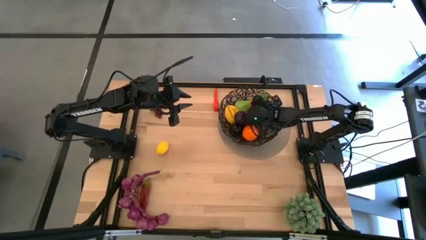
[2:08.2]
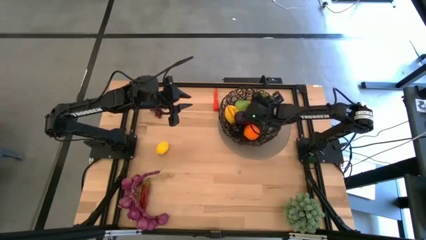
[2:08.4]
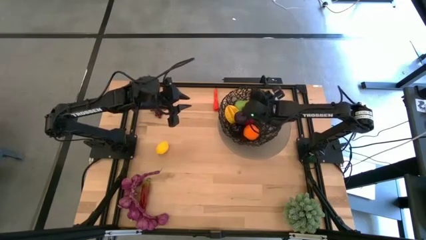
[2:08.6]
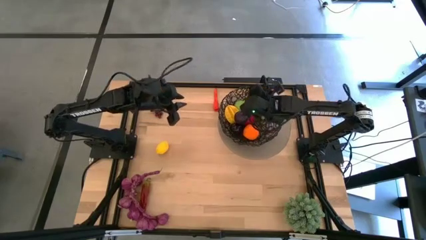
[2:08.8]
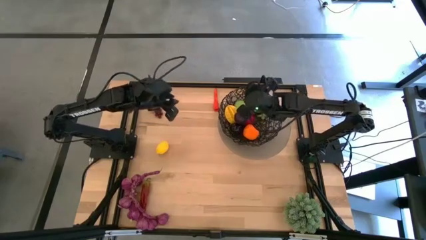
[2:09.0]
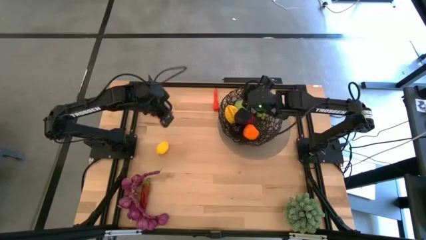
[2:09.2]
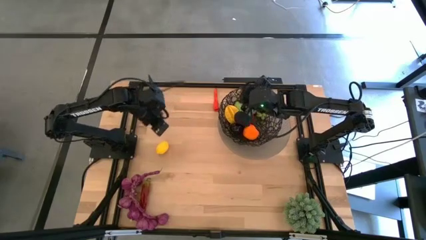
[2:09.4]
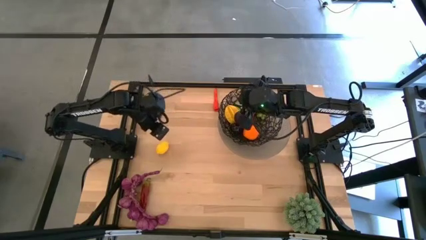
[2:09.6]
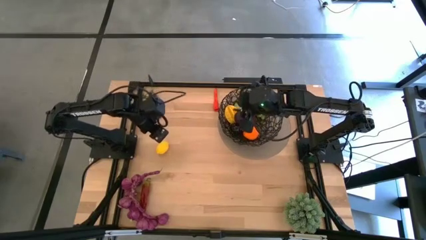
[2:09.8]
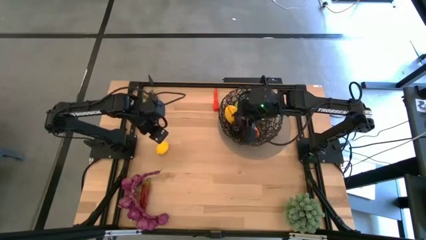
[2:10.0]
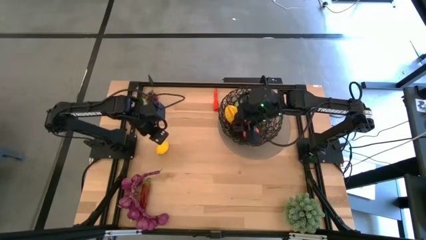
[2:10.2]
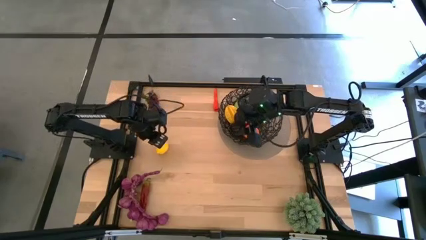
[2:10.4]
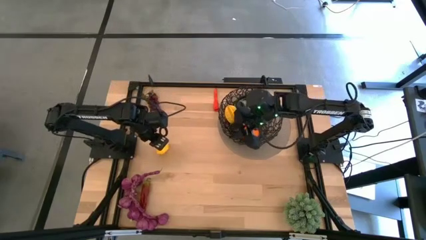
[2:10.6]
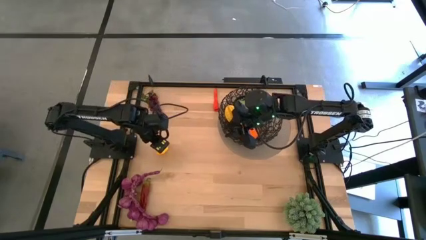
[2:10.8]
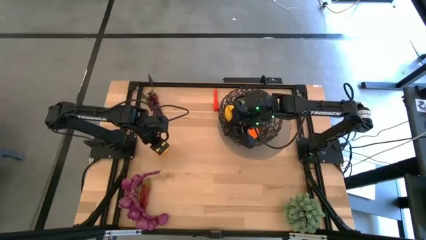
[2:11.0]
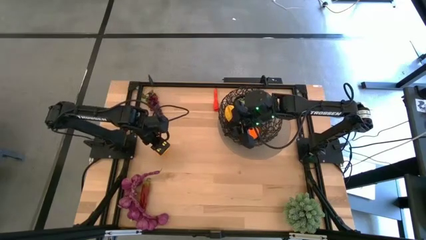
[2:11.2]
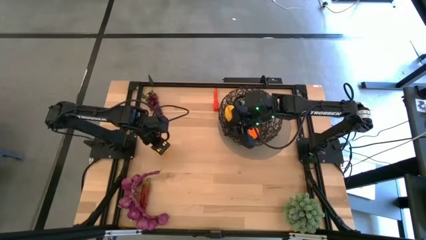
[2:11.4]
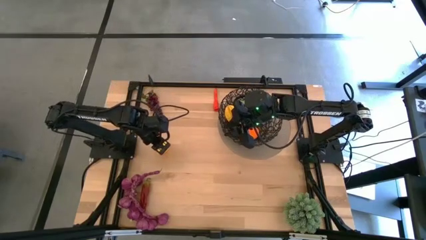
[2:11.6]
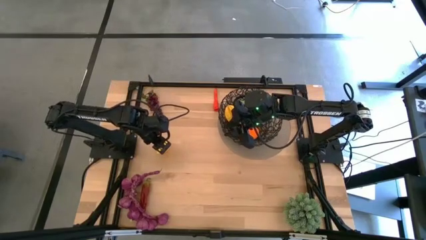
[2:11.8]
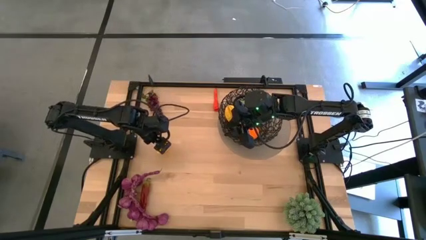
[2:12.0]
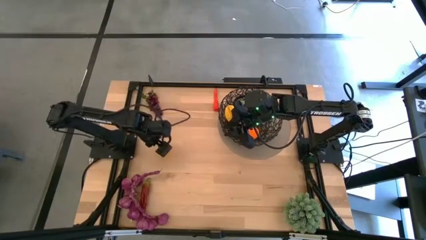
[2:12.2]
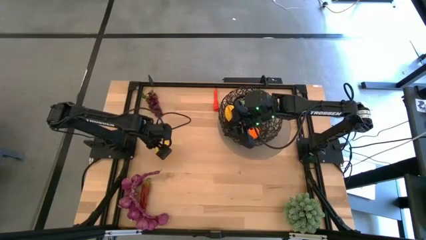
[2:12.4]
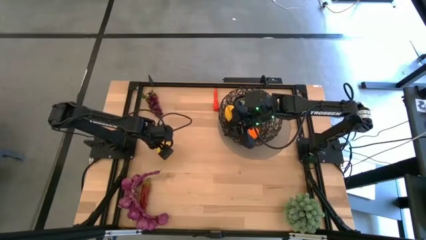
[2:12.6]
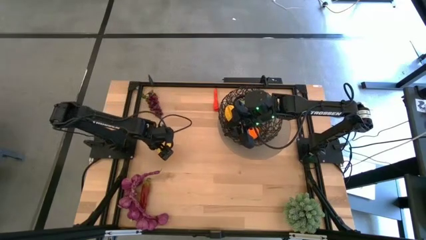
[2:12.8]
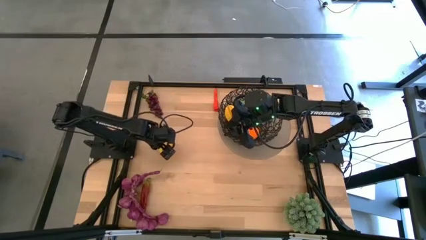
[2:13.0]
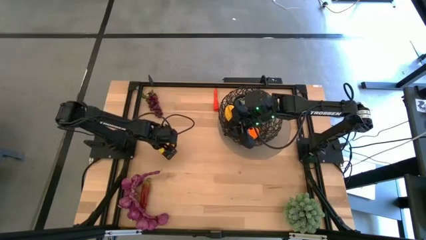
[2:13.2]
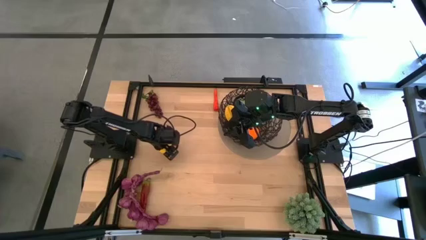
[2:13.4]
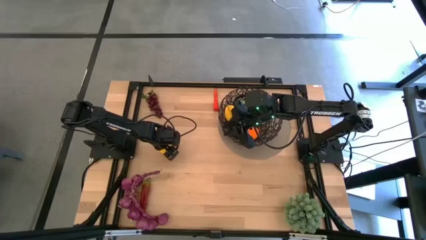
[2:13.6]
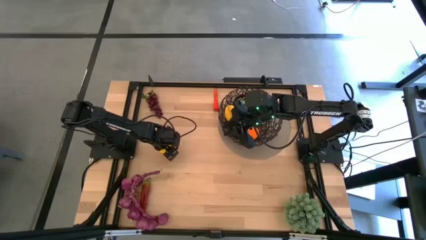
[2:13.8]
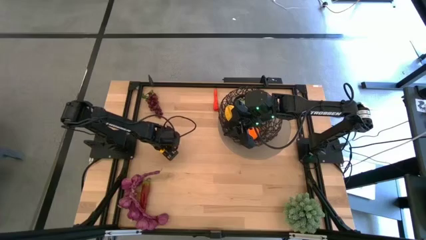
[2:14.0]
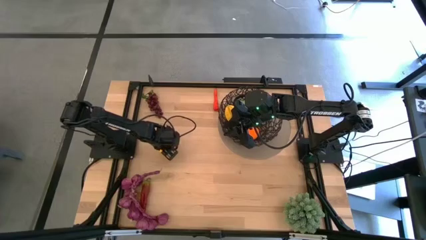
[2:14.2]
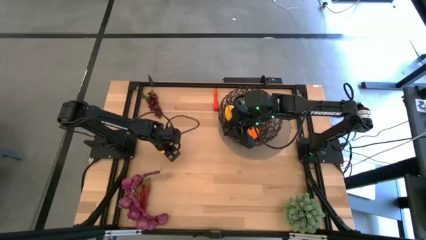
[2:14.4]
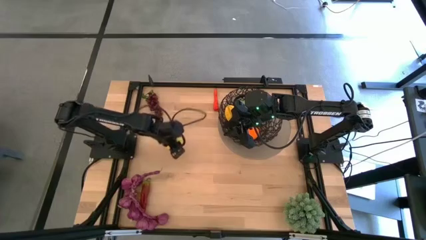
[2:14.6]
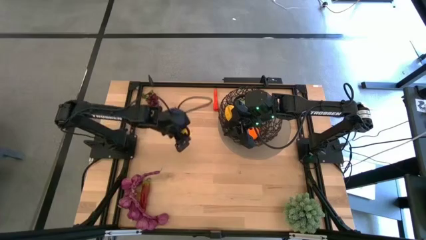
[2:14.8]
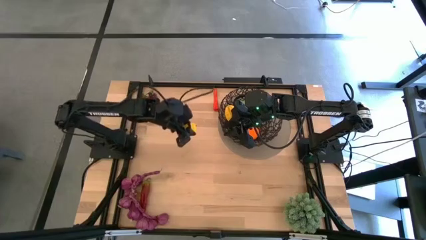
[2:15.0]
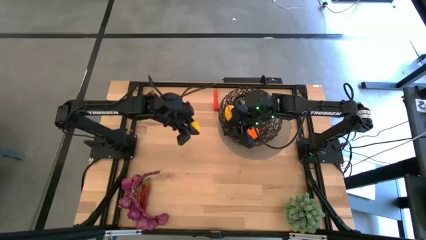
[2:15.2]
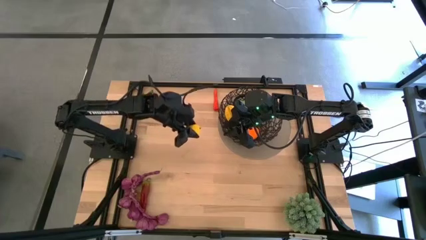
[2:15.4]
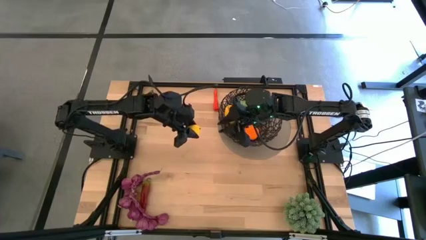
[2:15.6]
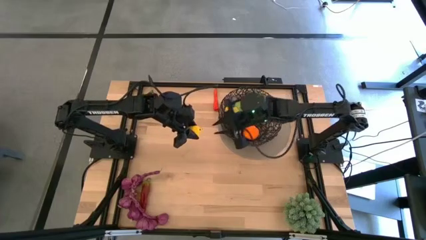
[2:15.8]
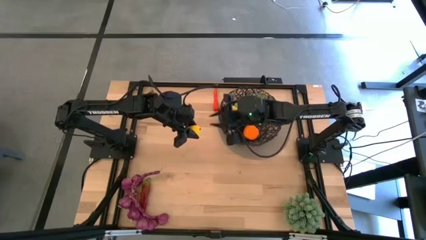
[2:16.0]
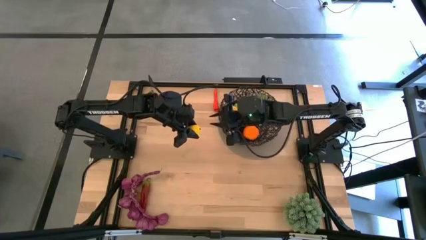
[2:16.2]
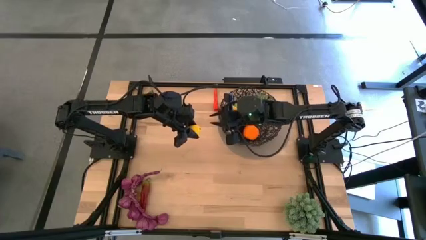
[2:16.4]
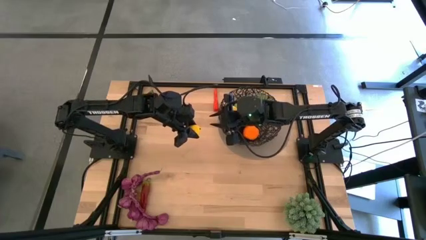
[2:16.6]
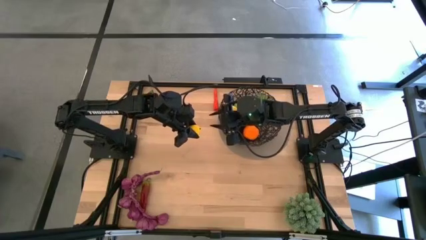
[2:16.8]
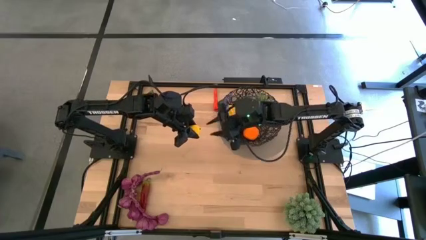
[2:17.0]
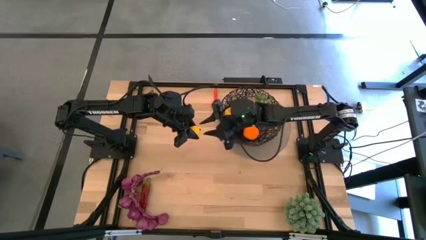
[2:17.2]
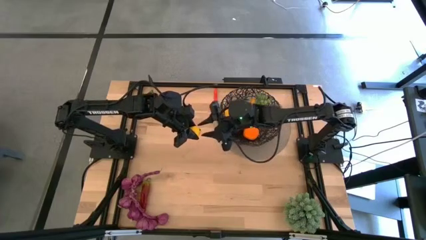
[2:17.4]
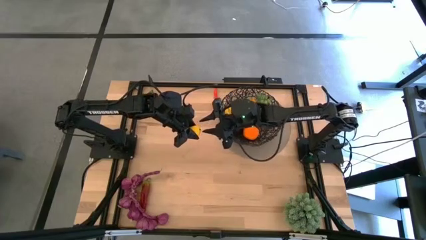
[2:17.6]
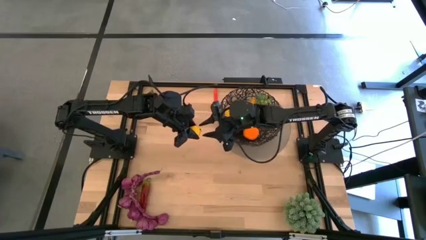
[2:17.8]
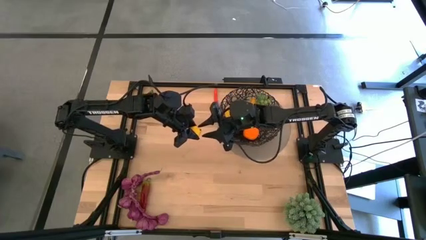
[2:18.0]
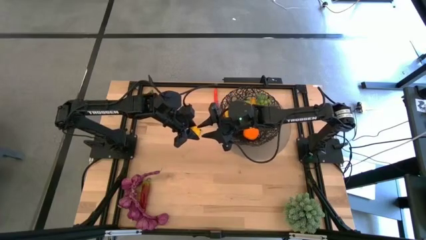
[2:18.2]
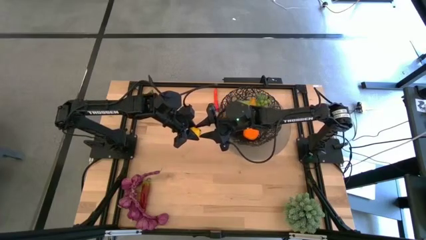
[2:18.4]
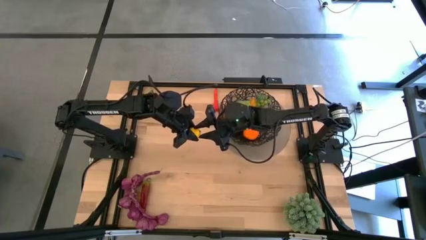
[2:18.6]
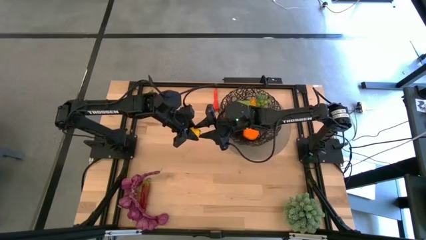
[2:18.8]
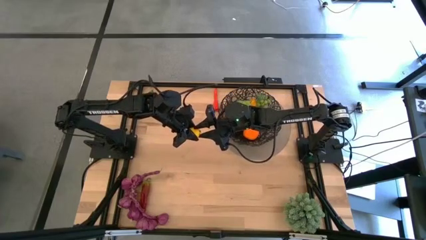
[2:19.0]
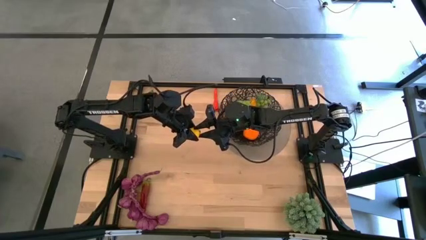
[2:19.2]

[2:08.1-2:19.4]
Task: Build produce basket
Put the lemon into the black wire basket

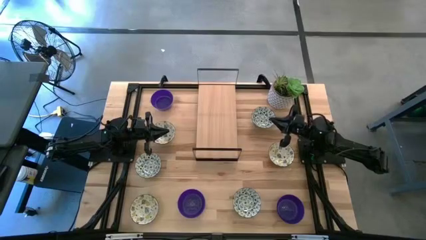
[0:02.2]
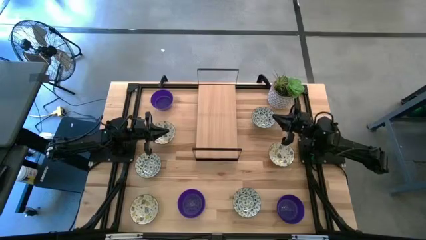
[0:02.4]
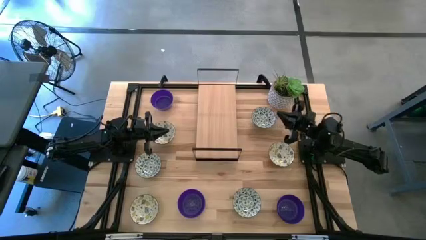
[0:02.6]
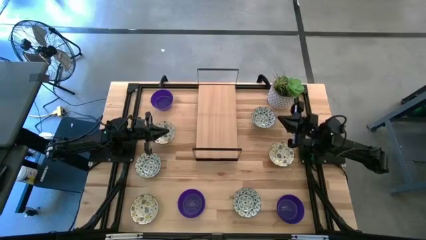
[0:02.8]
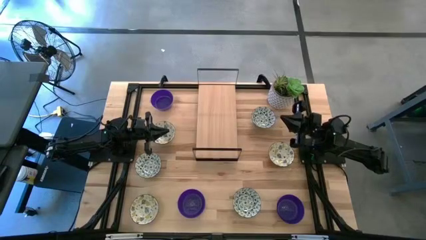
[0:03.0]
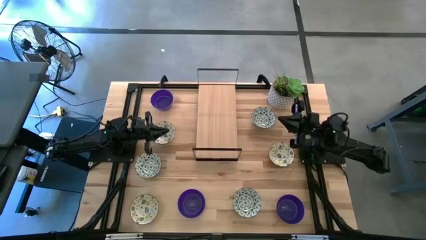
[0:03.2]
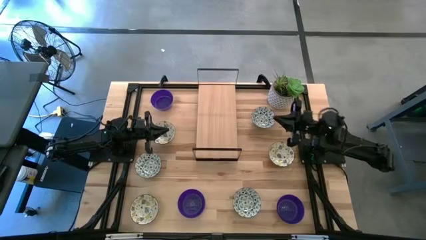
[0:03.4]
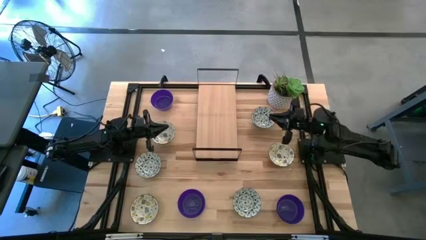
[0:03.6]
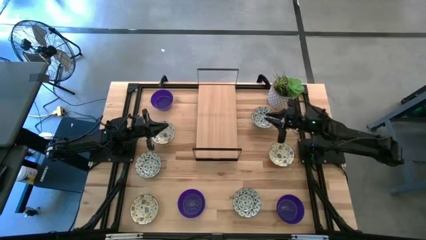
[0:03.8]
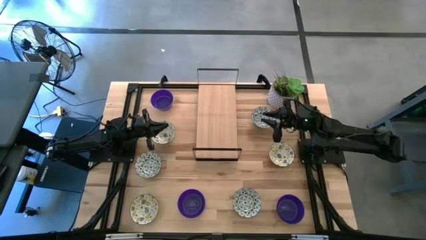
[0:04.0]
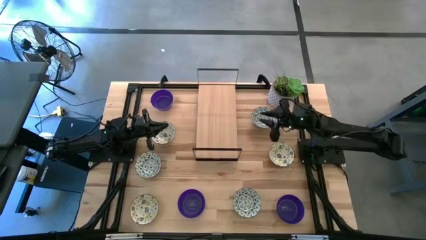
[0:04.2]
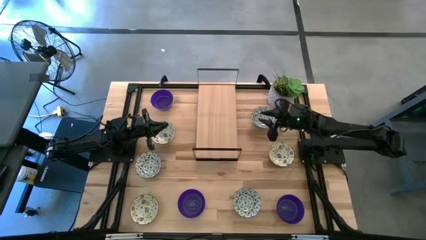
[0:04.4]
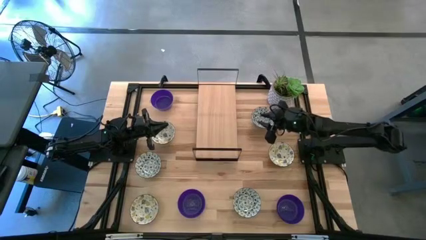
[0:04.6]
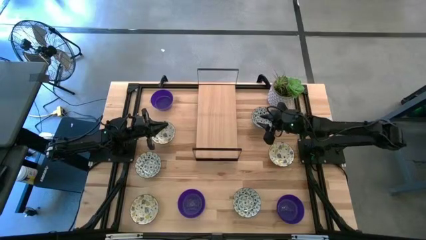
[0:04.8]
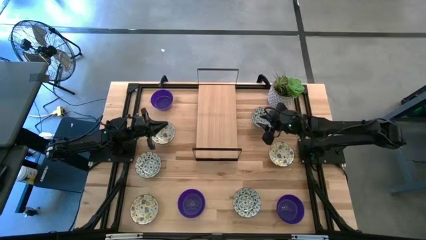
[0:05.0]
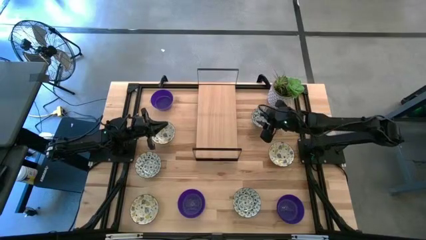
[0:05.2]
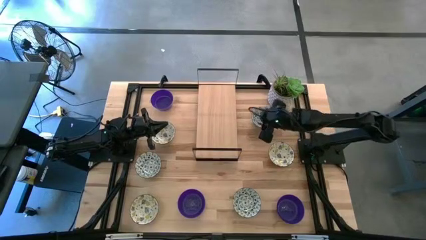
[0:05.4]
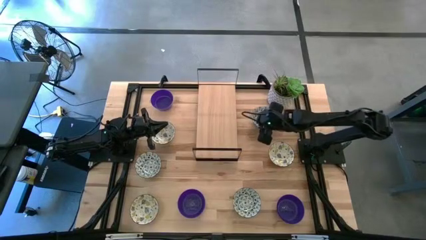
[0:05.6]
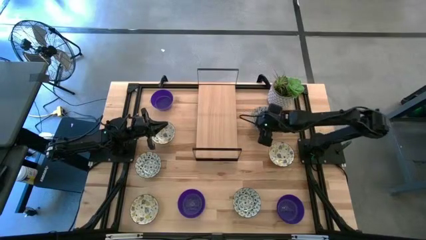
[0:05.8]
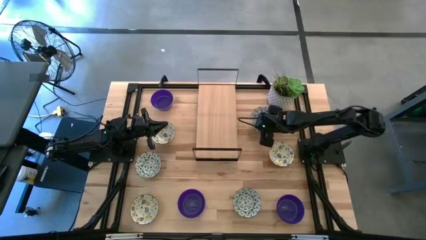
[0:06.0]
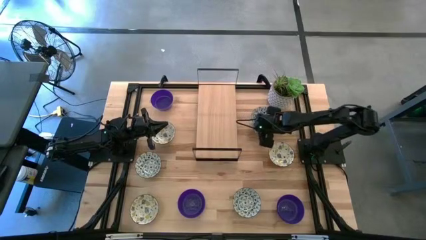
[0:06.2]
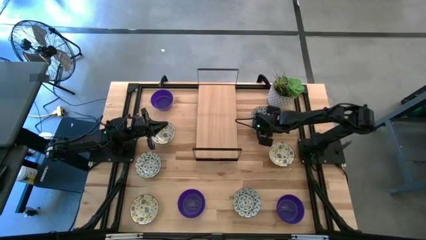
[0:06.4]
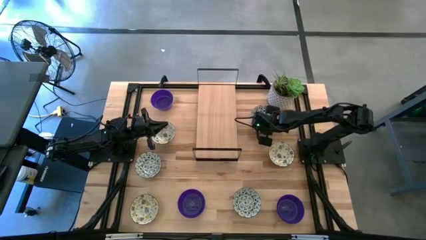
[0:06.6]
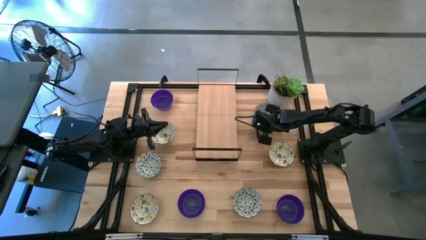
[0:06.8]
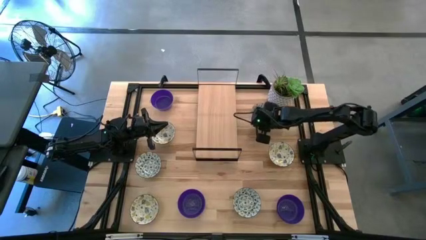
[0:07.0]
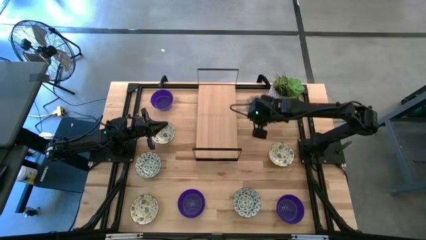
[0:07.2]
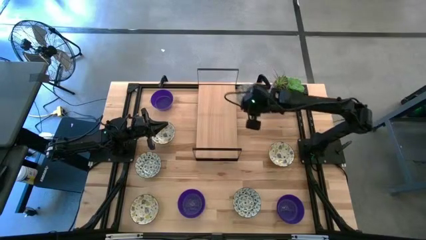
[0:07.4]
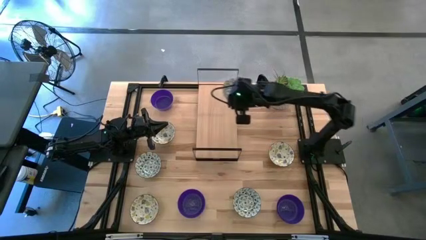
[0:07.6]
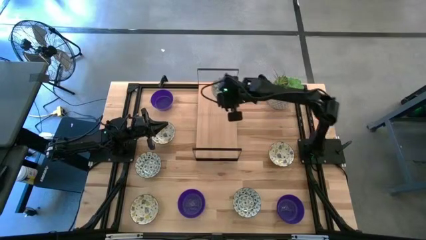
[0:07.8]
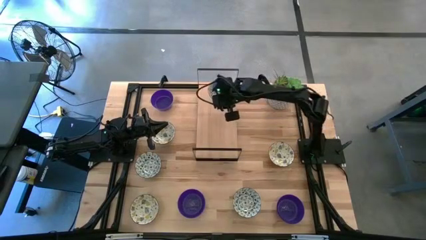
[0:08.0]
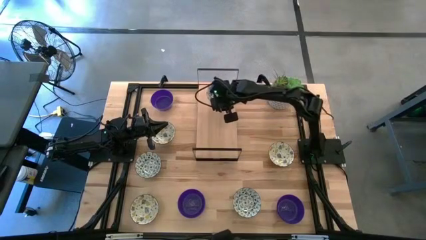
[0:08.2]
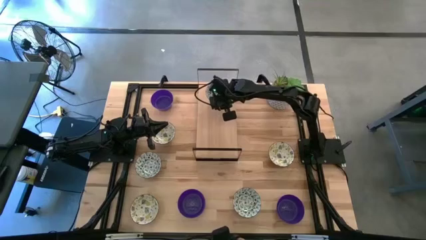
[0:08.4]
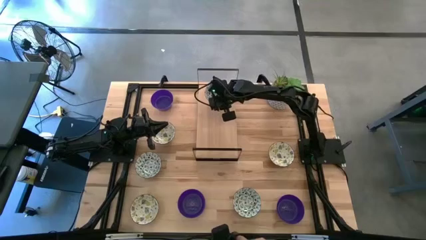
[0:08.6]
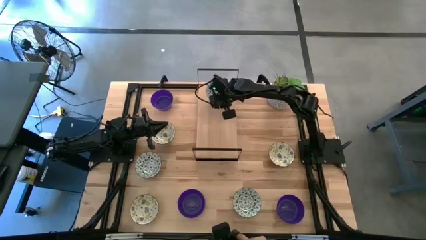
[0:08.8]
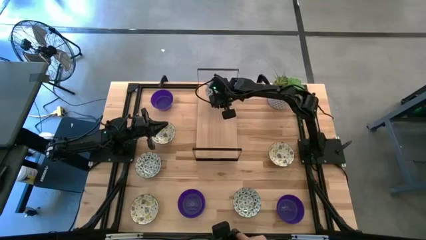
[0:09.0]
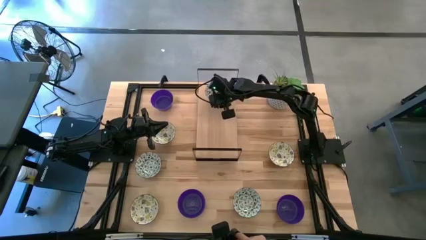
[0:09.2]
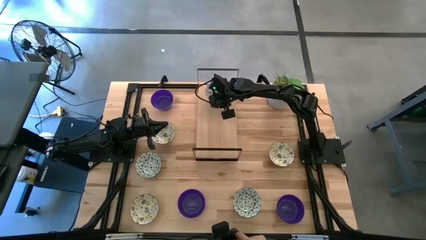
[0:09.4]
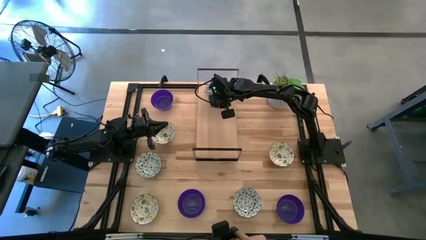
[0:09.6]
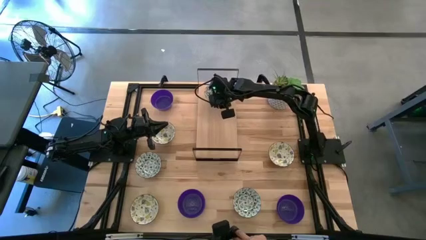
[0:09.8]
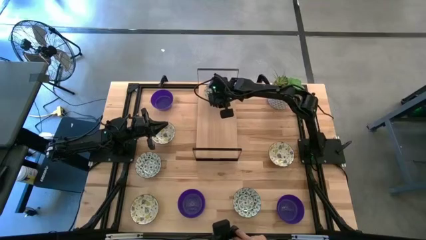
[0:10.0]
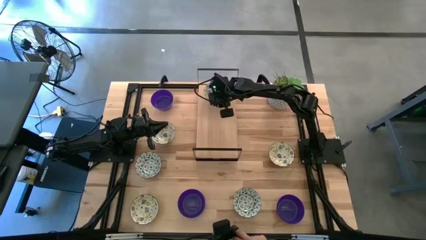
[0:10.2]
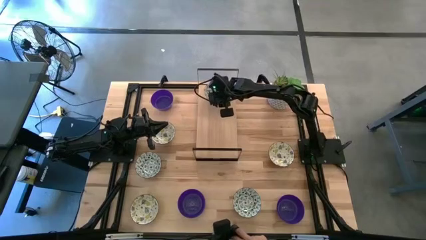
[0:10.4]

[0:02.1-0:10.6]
Task: Pick & Place Mini bowls
Put the top right blue patterned bowl on the shelf
